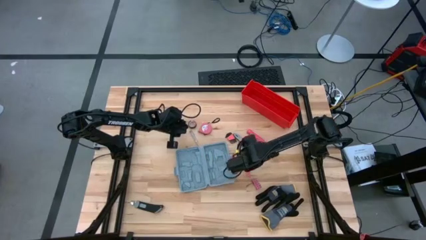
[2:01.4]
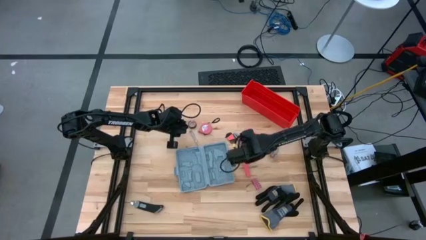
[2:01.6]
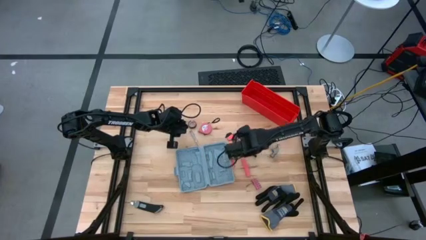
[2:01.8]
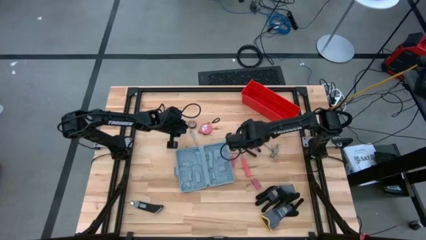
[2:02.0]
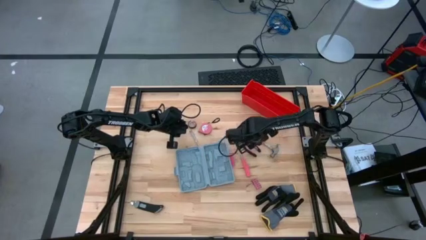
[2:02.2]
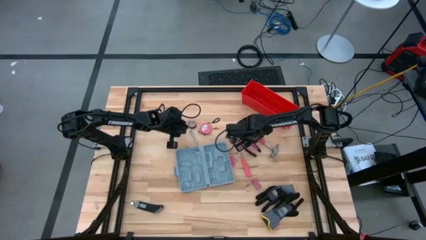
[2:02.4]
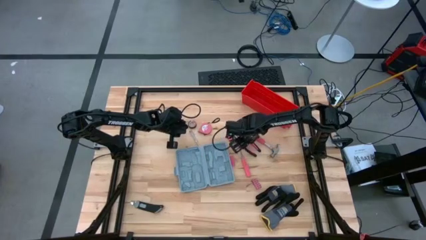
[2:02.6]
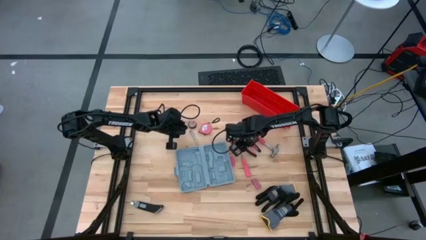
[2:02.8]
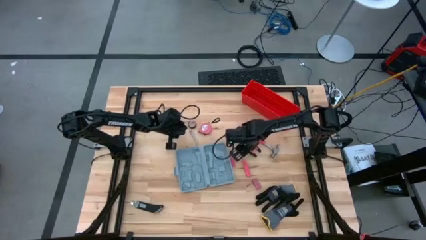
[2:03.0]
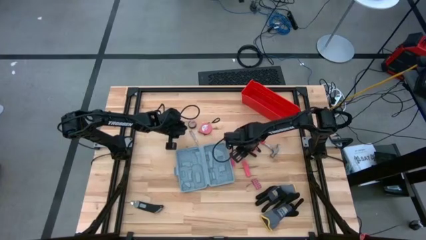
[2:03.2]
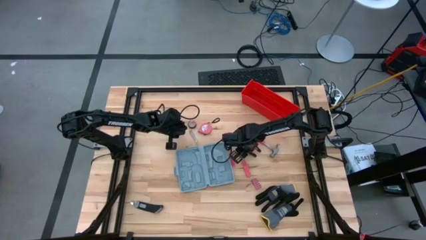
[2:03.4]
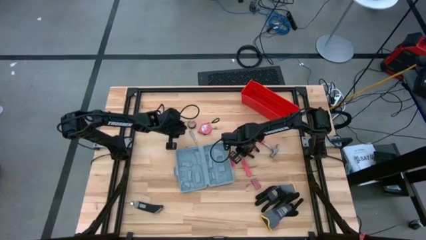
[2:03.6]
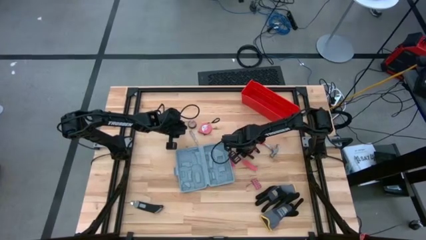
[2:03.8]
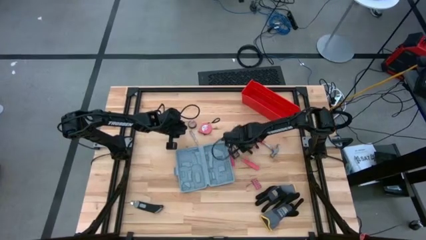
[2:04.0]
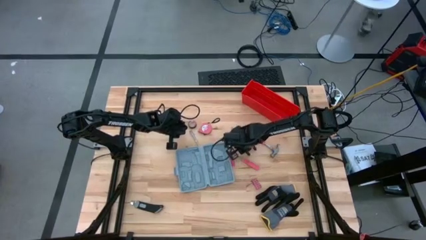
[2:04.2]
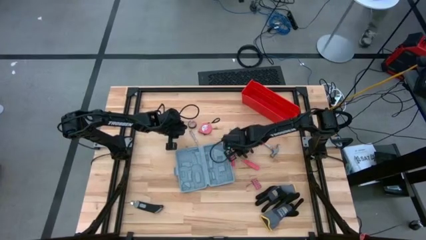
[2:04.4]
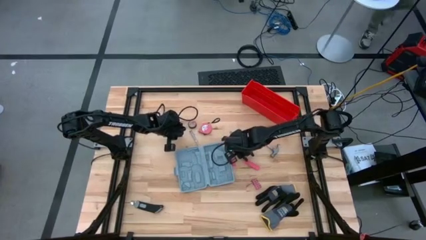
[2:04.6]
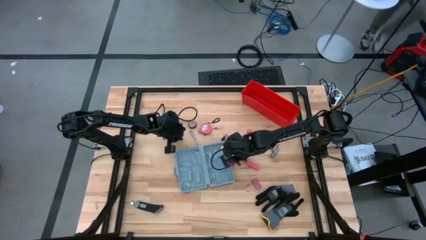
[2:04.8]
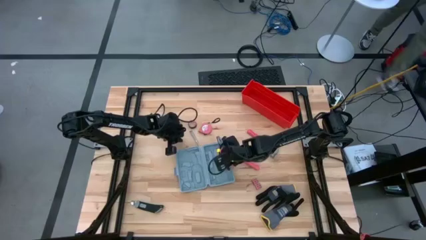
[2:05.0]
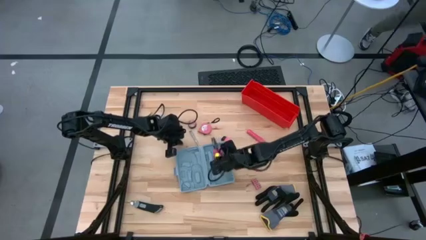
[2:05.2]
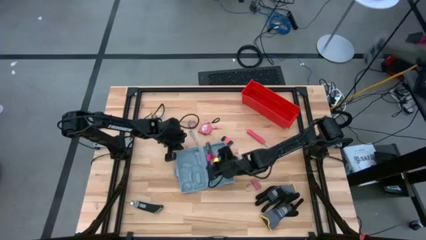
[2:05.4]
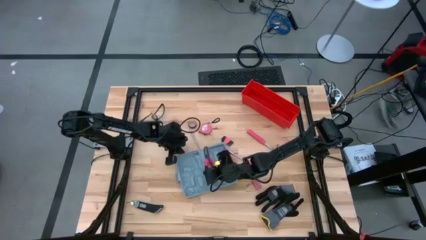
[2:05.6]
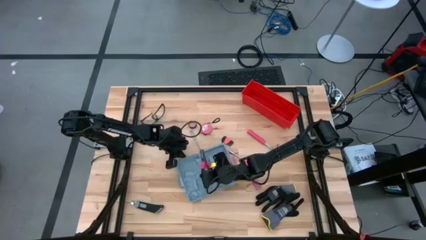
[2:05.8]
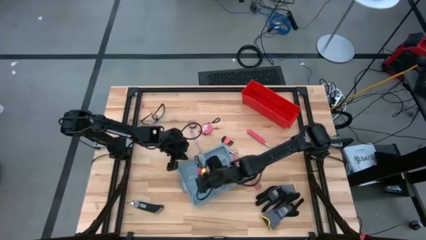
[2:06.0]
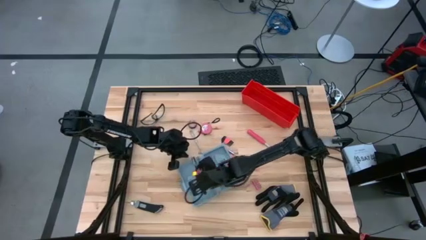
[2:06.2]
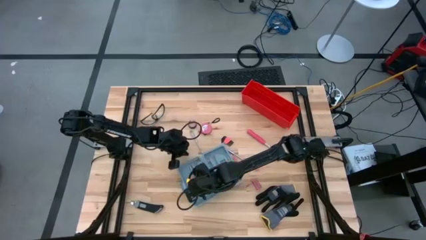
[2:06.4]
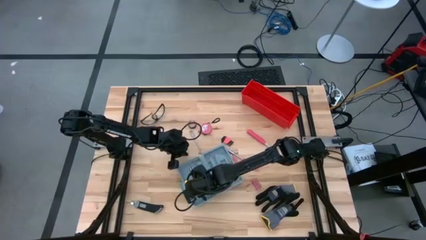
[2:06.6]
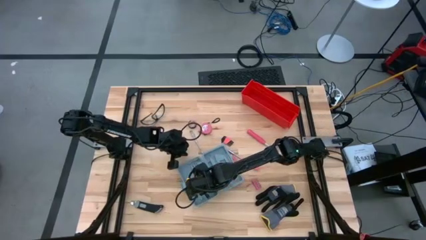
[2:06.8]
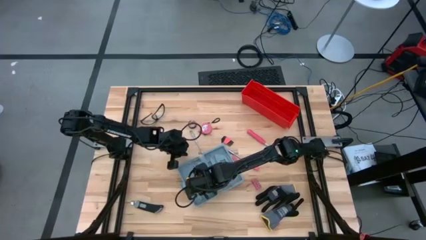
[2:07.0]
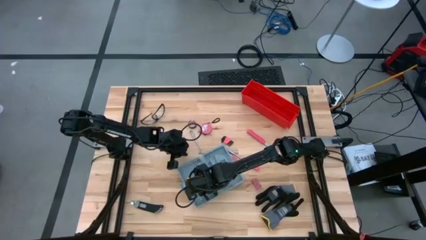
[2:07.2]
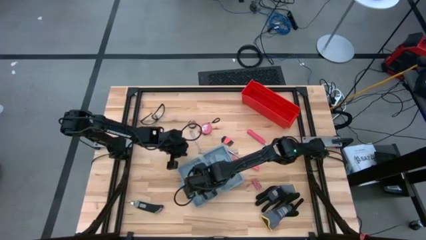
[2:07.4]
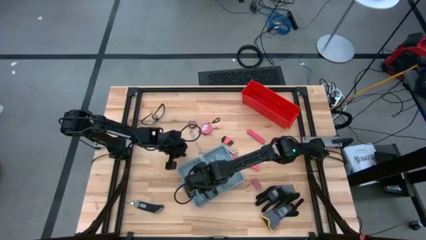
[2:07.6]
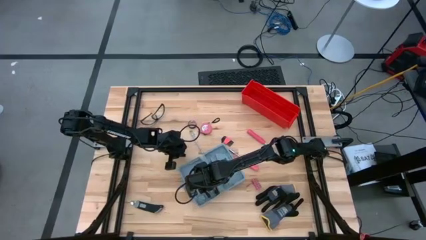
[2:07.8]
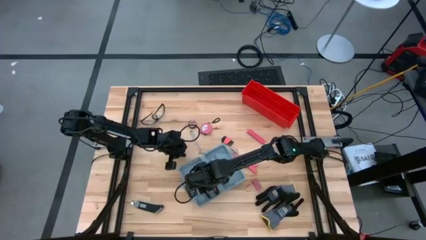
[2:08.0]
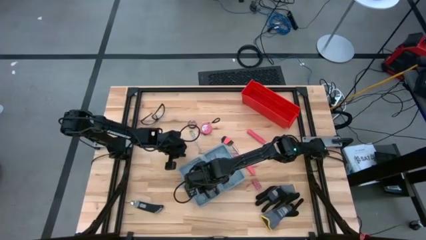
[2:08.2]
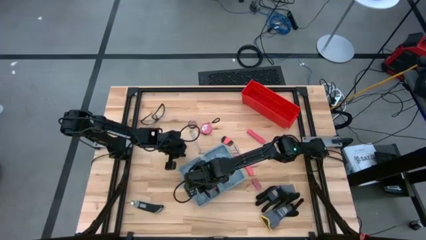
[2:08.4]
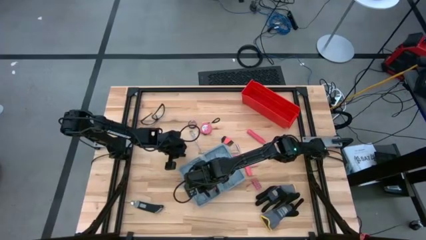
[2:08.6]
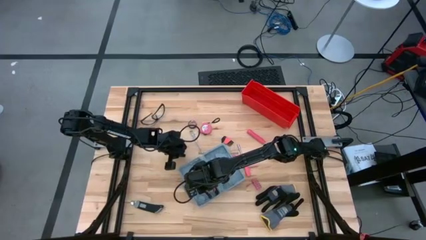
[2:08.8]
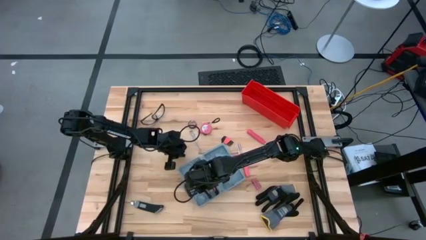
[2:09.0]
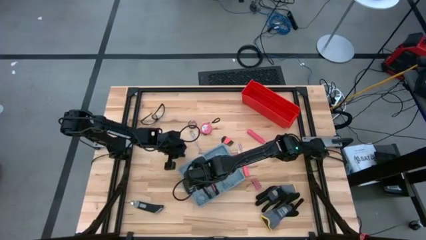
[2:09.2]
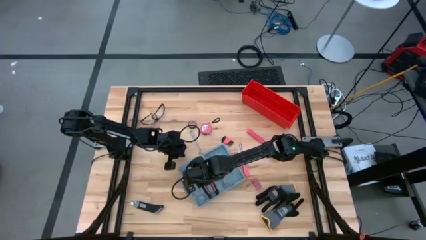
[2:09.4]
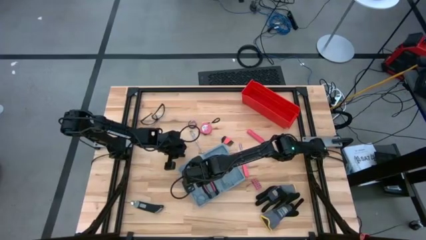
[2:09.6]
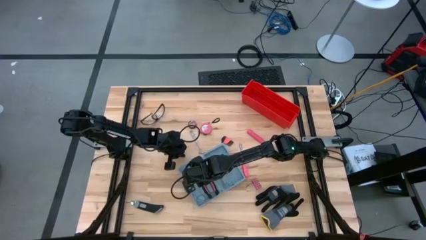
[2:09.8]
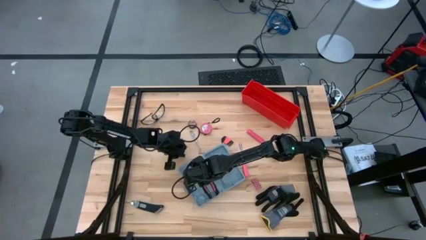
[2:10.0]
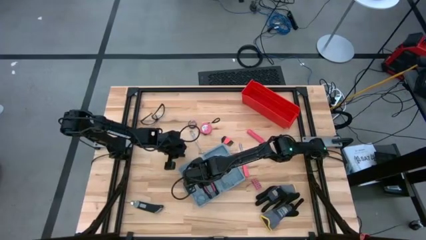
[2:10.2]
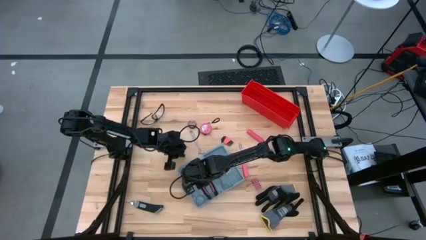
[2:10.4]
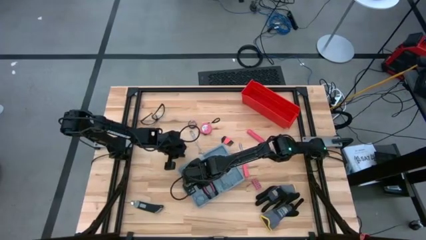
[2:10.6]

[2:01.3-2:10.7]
Task: prefit tool cases
Put the pliers into the toolbox

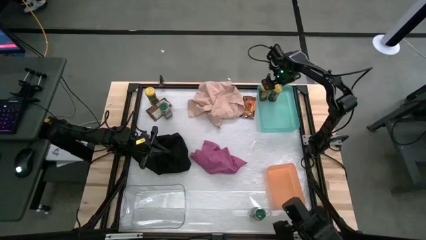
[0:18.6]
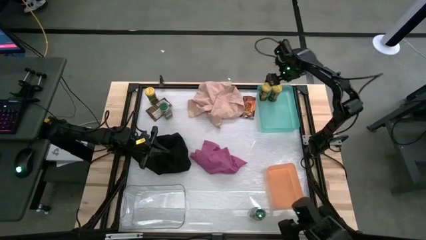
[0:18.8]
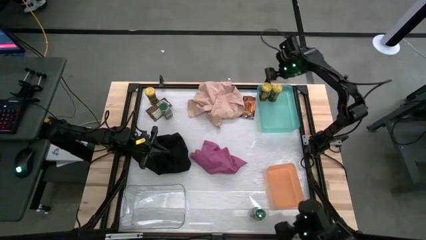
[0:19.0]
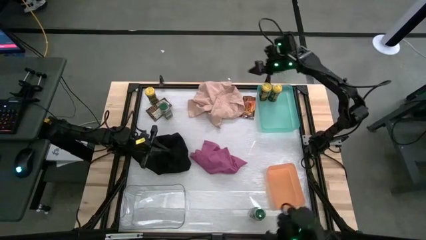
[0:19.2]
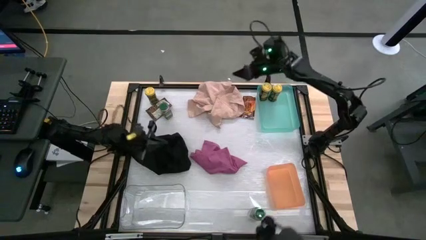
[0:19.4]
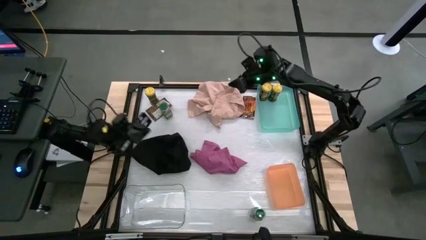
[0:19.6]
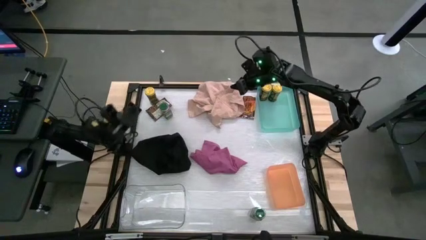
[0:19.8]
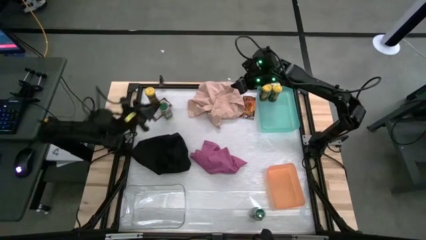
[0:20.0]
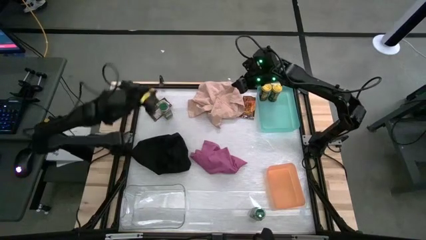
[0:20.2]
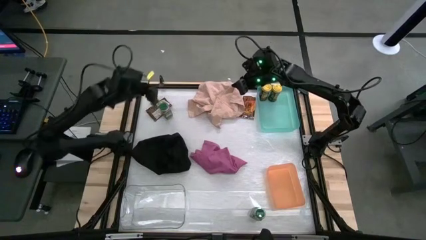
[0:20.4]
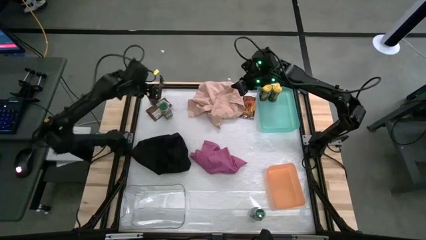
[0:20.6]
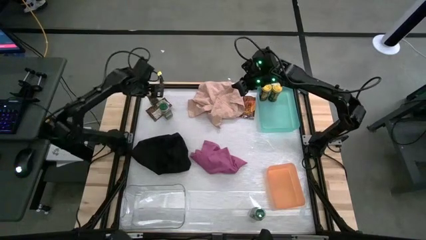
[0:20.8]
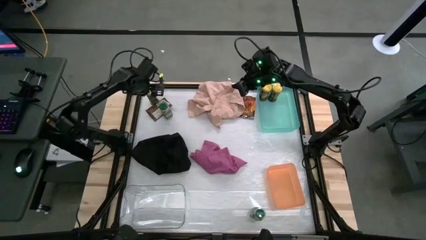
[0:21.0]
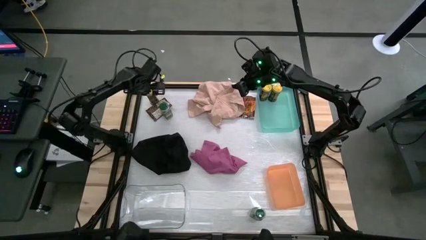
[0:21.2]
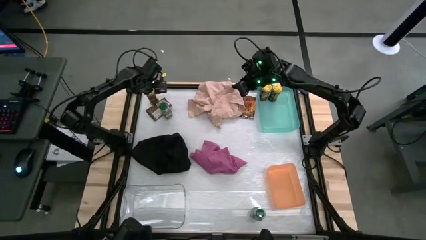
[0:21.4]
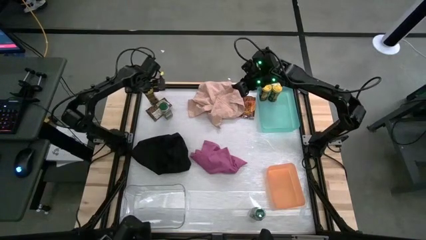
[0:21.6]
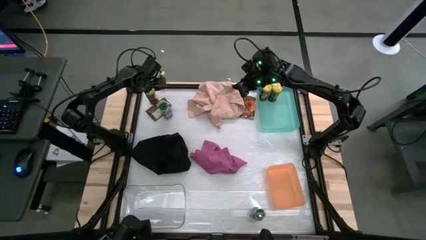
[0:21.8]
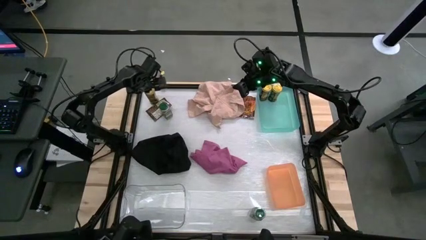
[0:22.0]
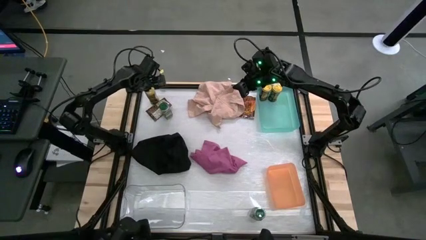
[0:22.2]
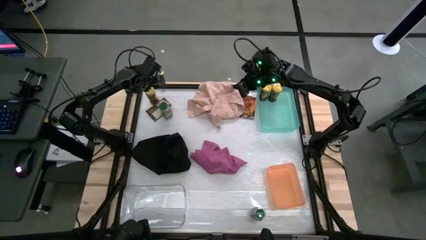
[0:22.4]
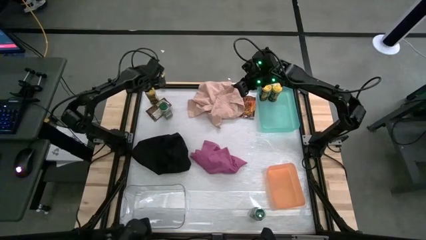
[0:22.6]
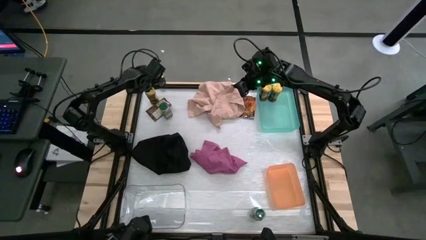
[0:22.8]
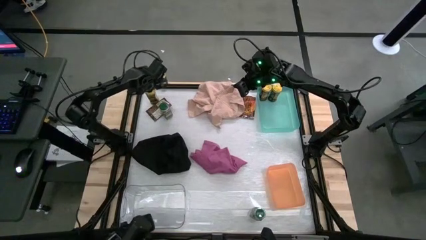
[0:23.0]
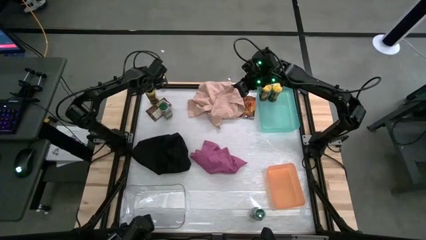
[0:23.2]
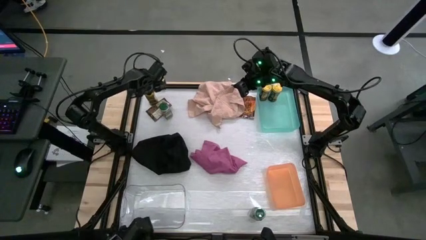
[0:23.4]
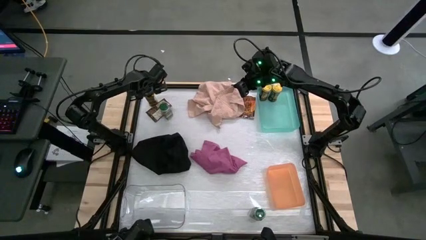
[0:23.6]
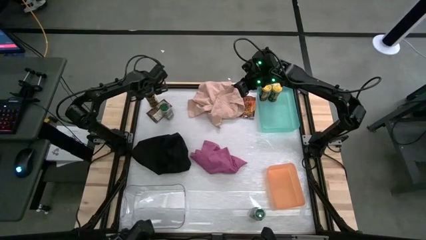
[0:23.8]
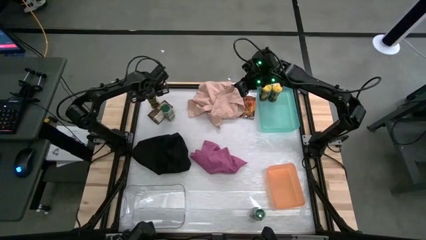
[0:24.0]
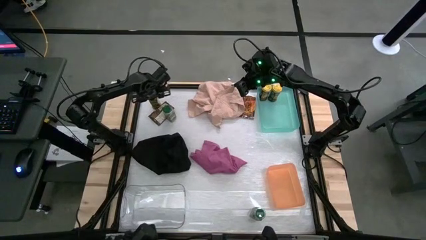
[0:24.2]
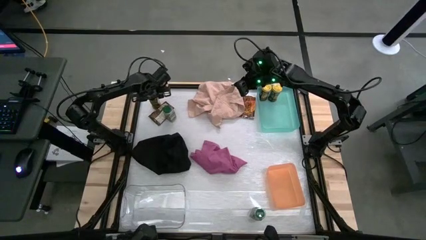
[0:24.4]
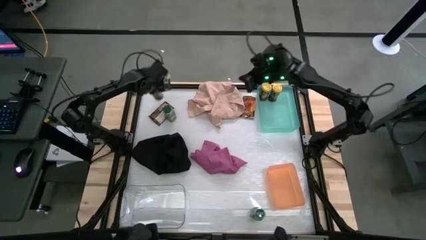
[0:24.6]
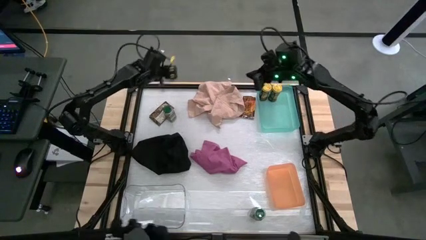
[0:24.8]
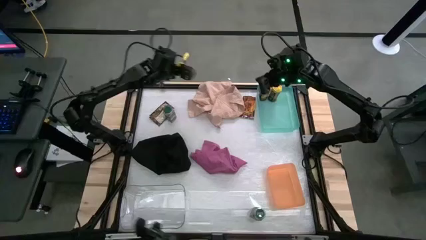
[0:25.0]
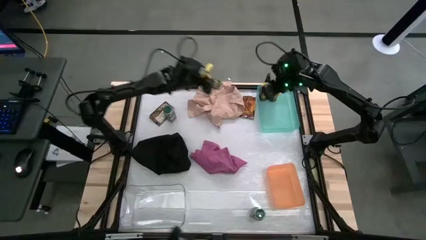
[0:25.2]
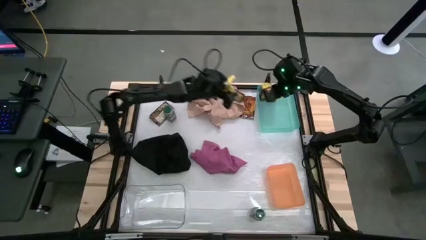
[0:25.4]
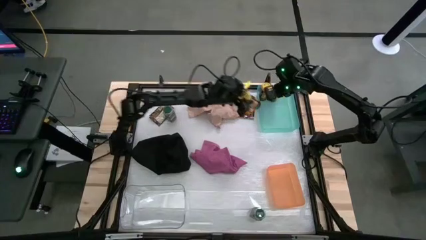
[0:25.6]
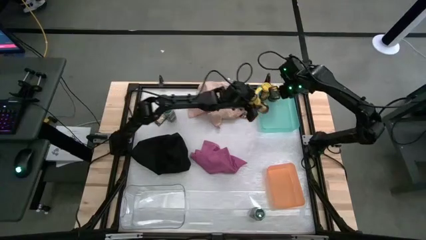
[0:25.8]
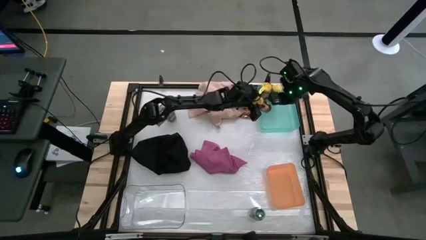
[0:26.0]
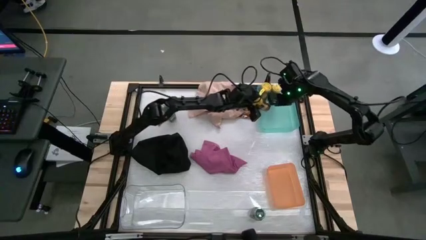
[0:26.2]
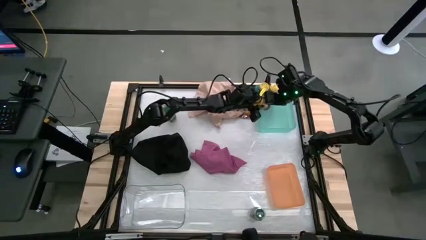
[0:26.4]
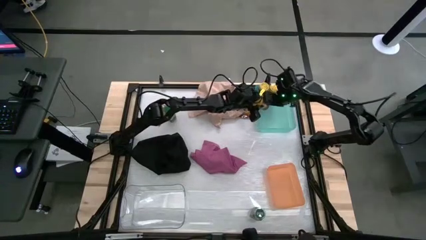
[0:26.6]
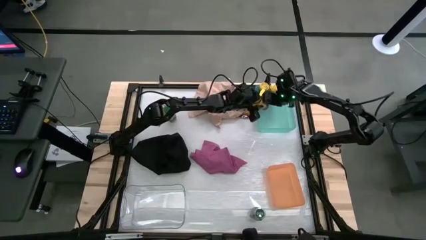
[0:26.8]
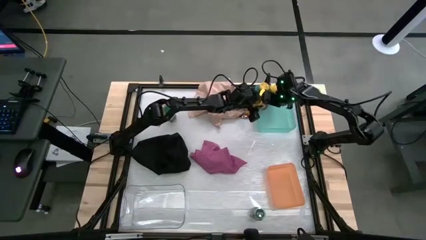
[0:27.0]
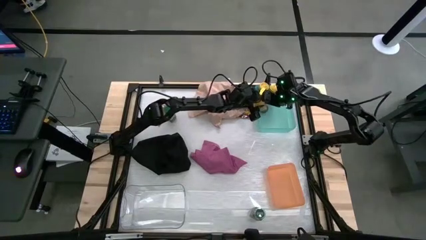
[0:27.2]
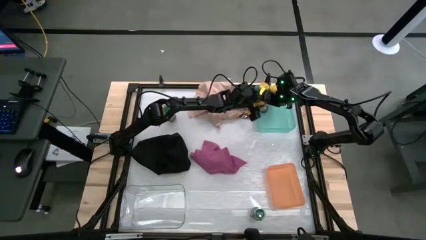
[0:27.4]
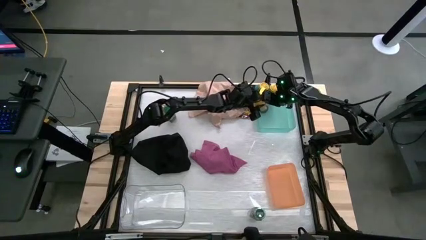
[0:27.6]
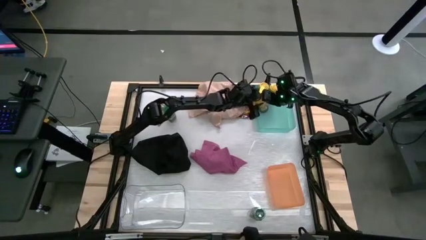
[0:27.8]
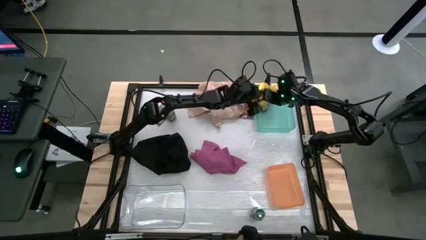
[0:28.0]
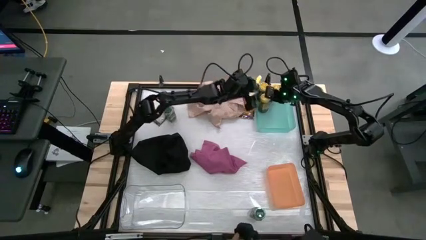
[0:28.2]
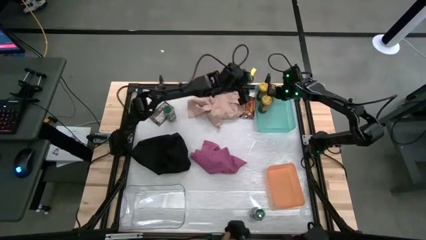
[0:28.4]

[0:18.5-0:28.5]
Task: Sort spices by type
Put the yellow seasoning bottle into the light blue bin
